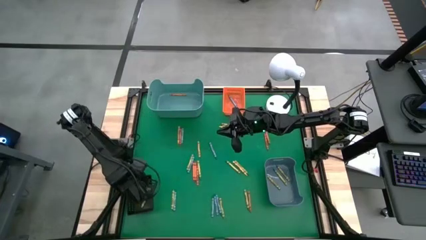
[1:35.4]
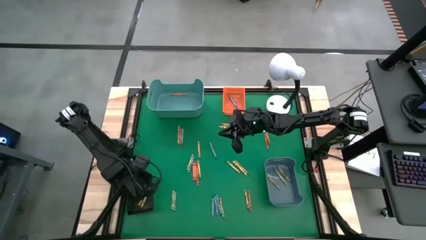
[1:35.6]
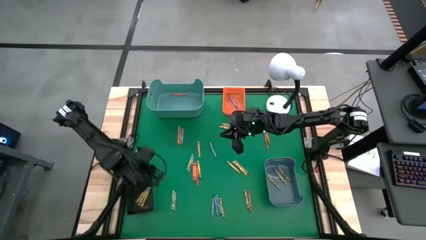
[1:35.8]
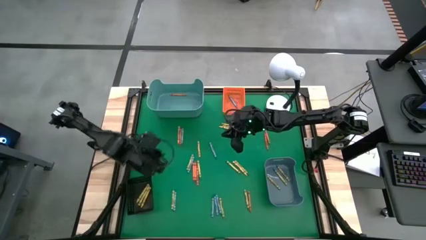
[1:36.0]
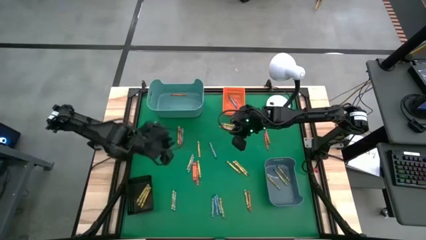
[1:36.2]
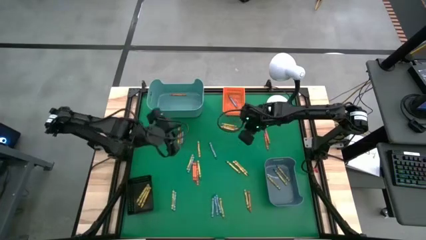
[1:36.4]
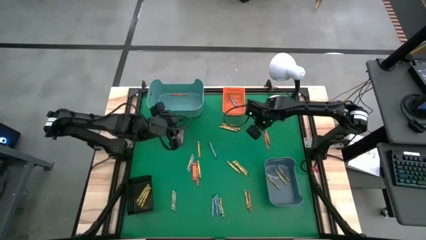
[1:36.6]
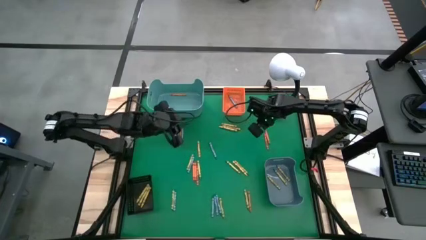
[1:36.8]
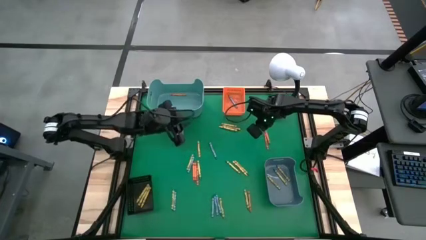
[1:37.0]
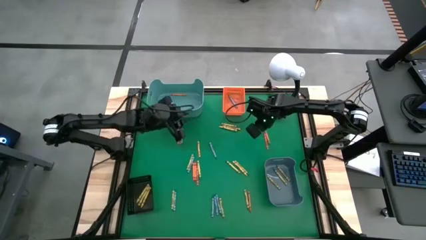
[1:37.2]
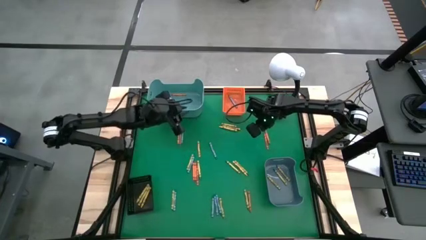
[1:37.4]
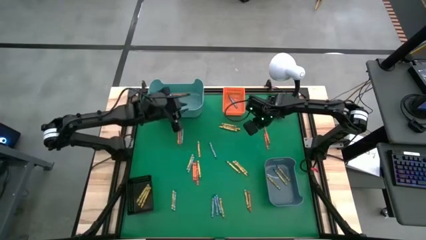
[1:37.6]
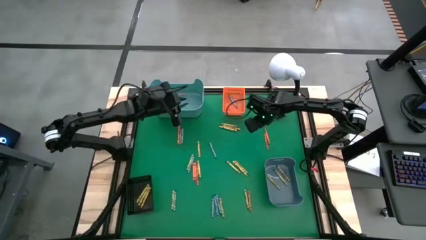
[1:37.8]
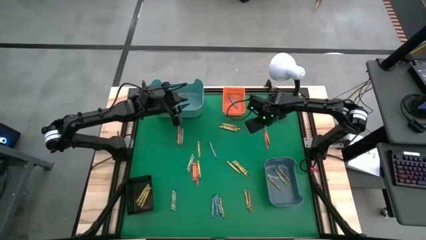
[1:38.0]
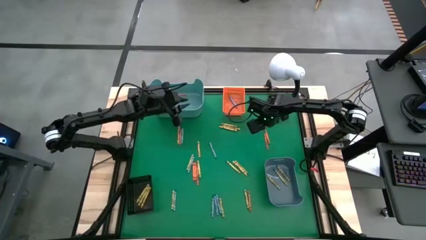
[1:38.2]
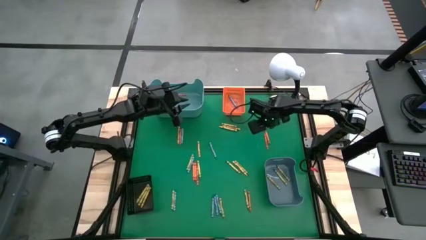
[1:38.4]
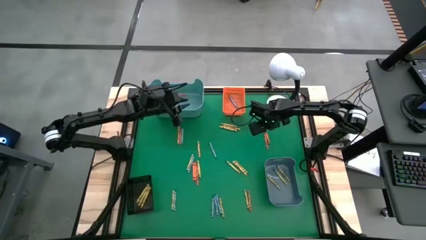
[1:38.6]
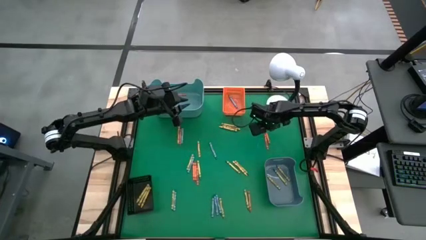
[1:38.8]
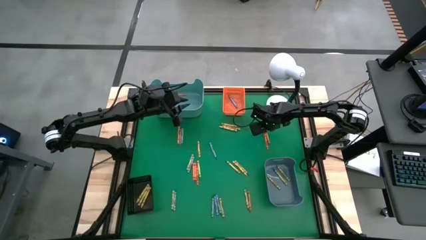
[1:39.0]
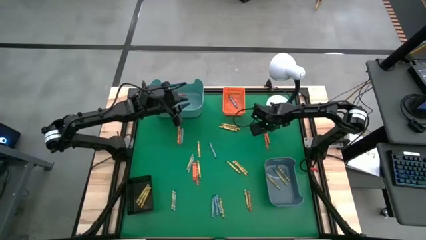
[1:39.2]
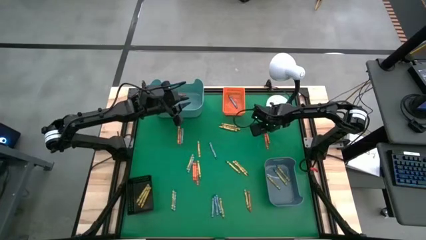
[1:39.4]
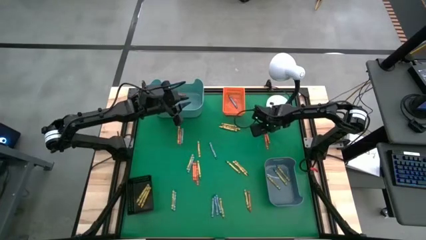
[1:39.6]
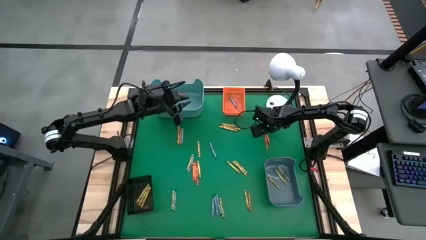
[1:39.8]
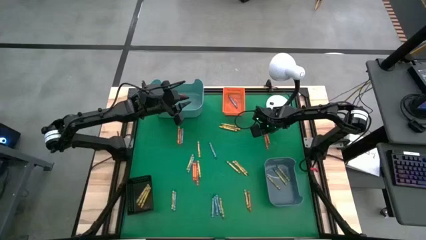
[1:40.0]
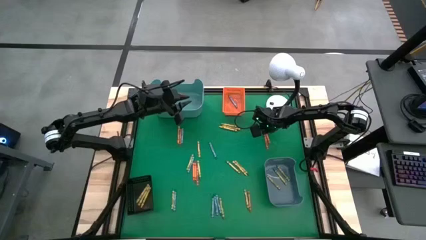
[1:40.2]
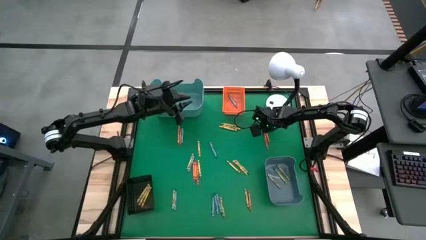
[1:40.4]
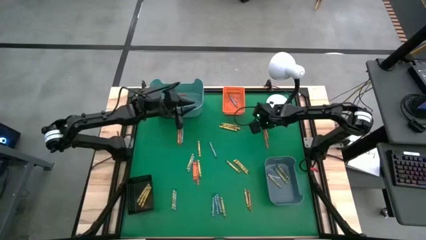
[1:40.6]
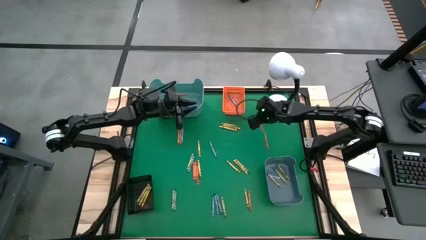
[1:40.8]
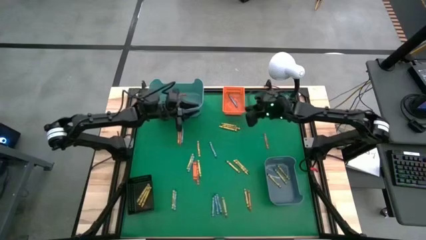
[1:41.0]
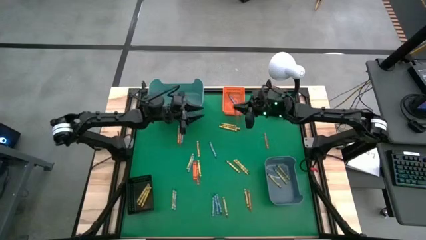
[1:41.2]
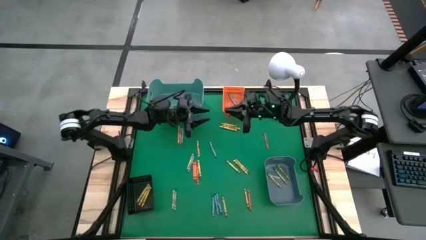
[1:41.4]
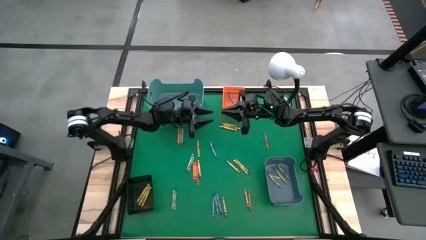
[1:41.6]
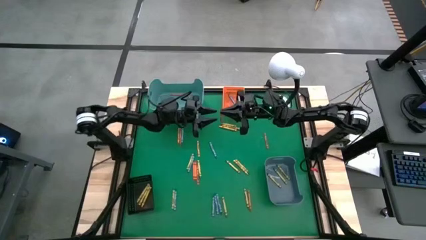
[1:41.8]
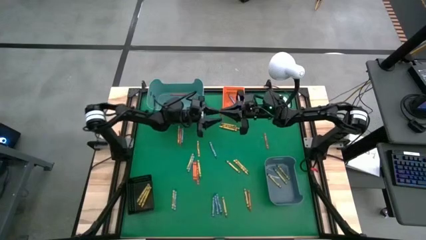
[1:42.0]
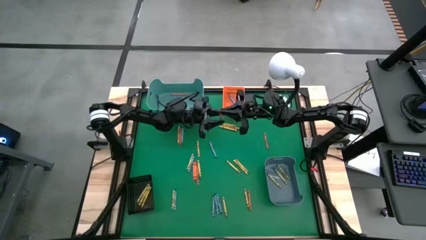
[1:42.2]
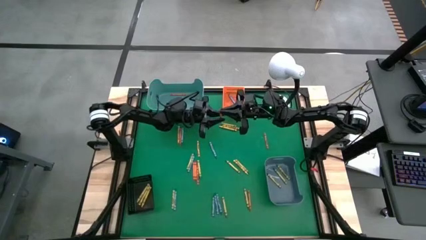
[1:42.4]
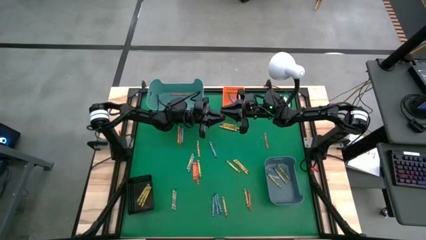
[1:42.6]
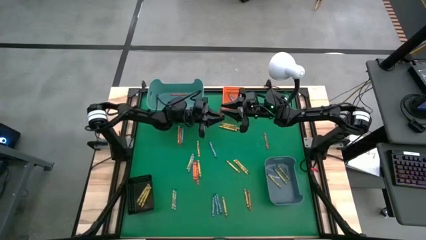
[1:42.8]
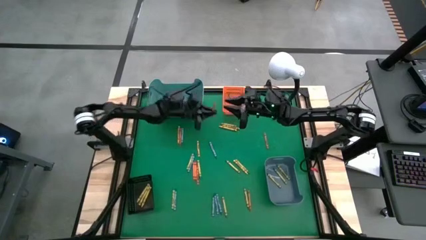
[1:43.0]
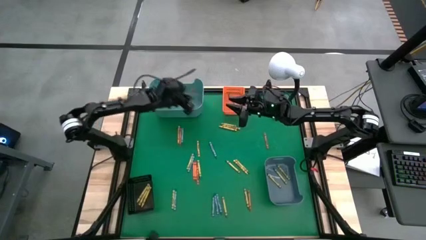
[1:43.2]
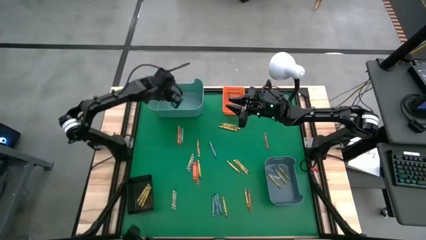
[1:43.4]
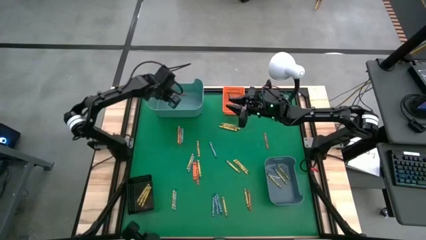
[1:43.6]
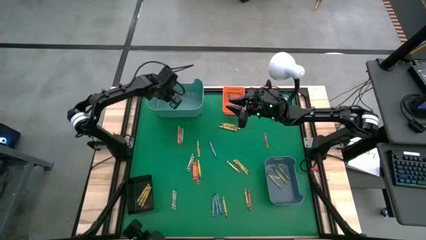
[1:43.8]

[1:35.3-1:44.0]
Task: Sort crayons
Put the orange crayon into the green bin

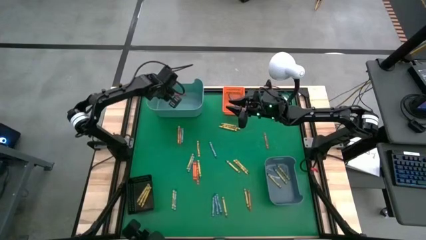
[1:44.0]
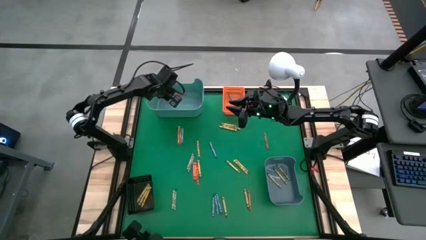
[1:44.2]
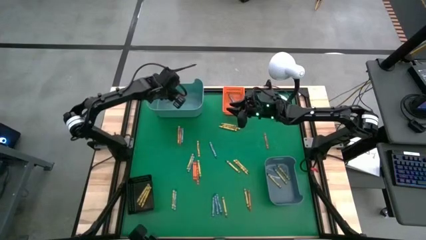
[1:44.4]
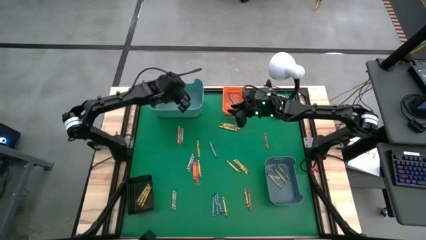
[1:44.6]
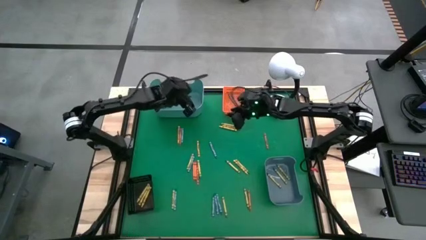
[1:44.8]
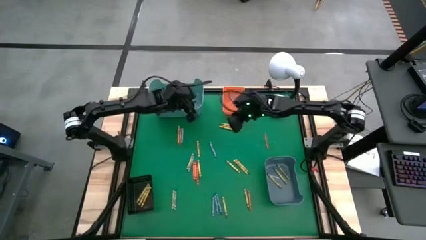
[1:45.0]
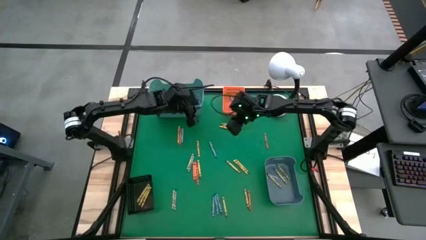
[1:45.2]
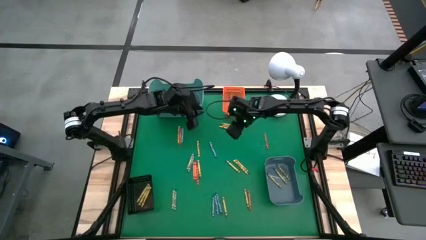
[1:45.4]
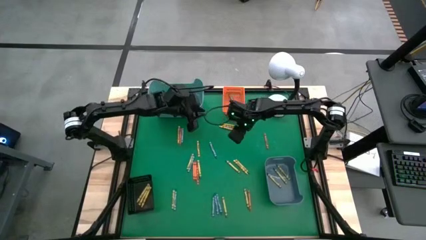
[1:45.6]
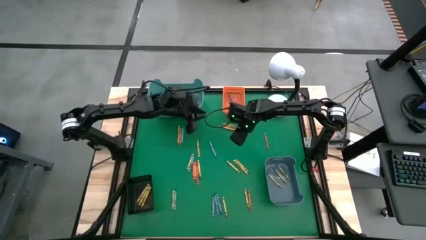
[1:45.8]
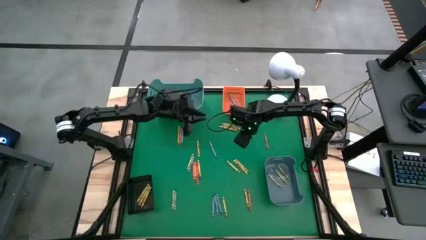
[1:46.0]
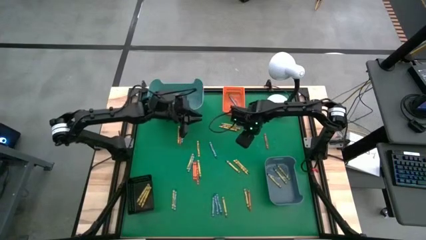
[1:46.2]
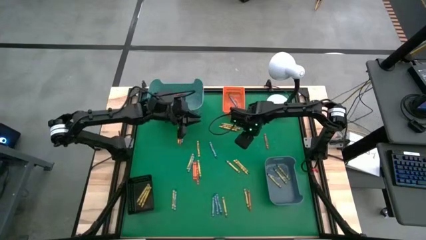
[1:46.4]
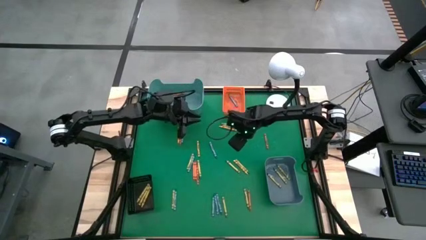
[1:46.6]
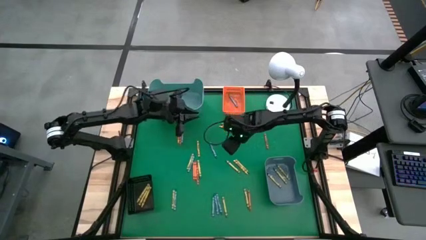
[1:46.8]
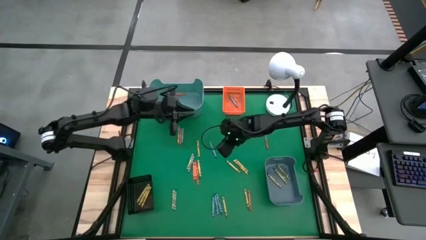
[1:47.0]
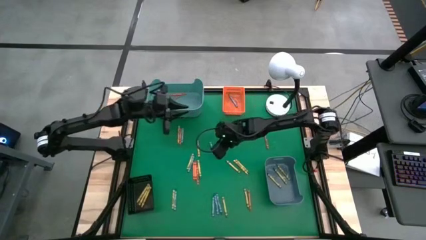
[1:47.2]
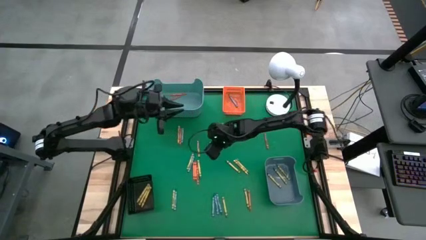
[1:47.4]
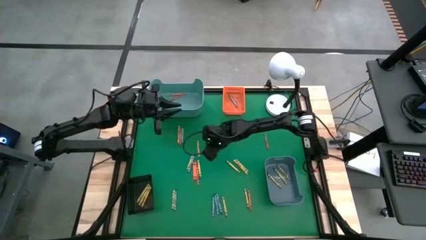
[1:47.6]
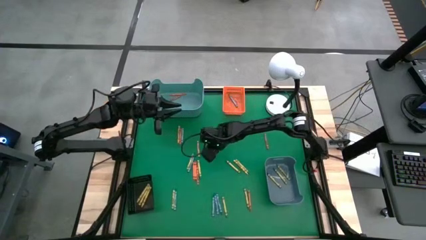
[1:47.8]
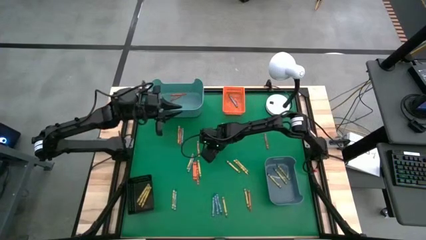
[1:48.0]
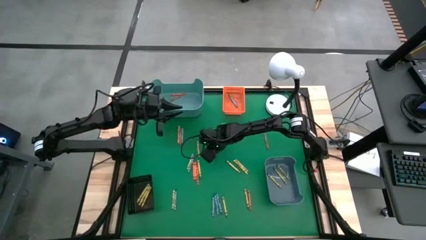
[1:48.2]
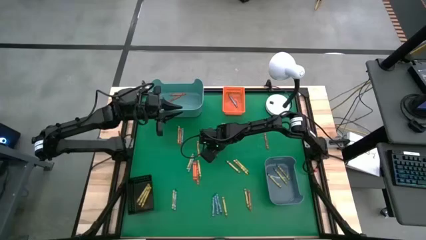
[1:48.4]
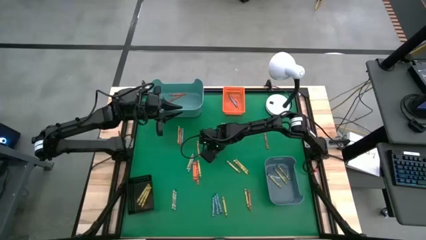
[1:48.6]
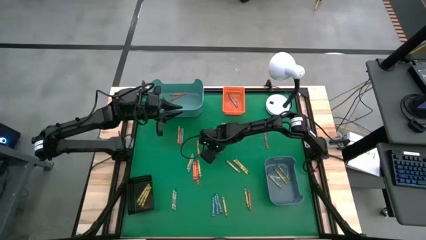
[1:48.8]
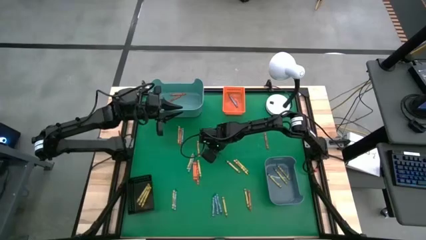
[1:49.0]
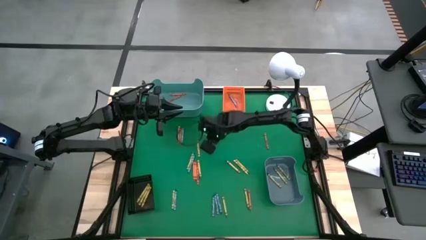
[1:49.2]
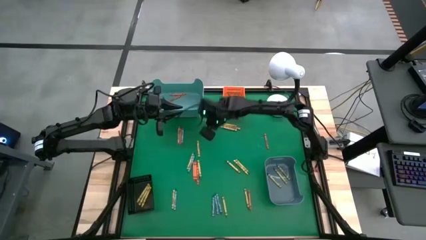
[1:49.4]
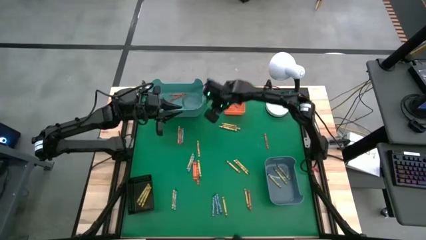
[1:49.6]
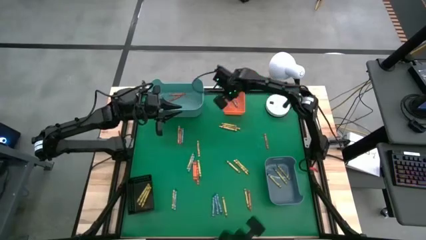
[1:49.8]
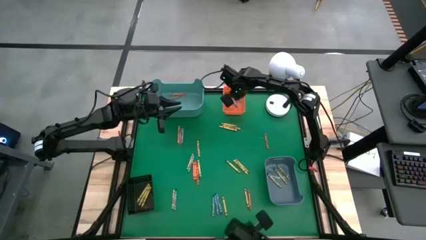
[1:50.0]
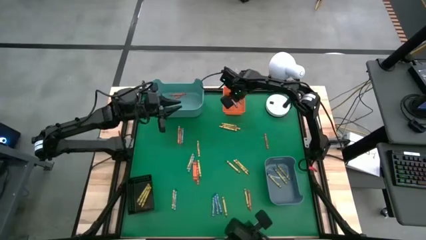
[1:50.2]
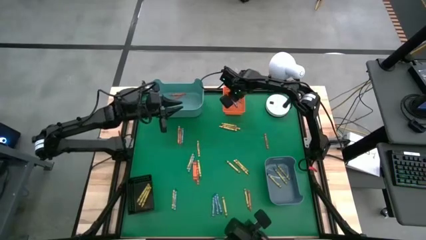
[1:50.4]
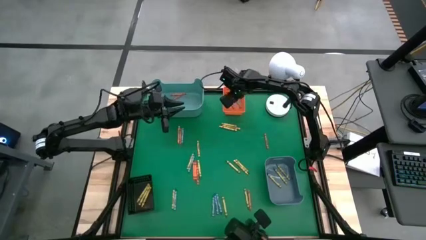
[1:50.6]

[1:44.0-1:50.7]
Put the blue crayon into the orange bin

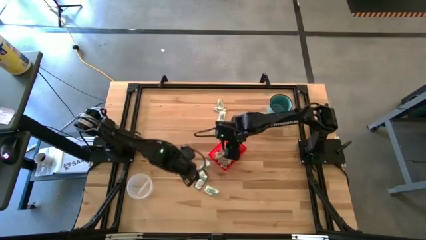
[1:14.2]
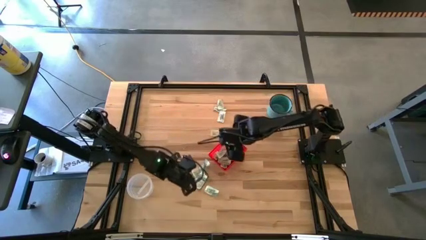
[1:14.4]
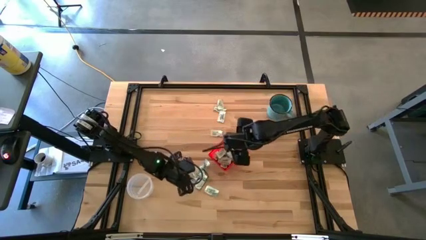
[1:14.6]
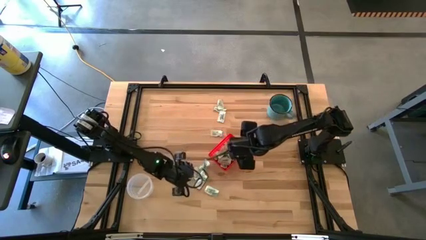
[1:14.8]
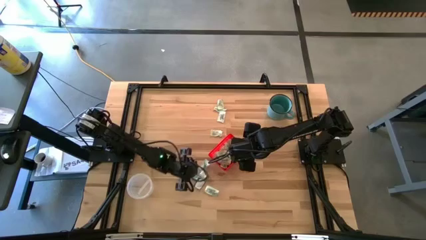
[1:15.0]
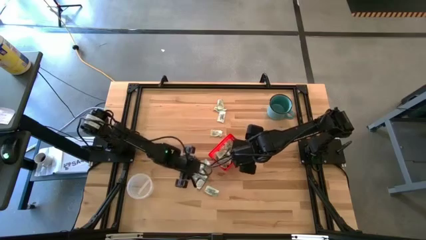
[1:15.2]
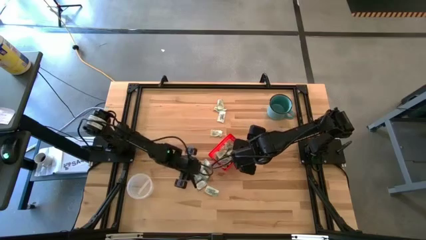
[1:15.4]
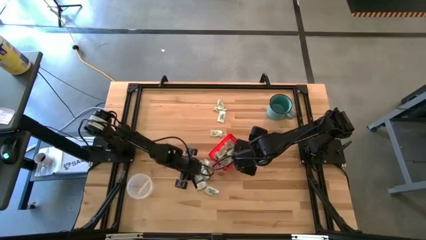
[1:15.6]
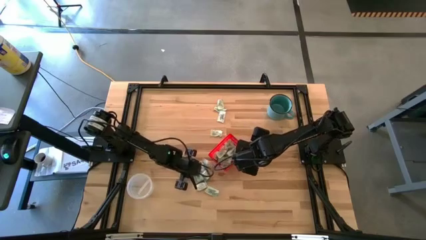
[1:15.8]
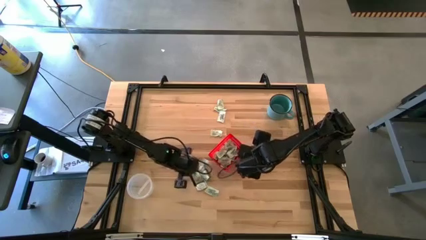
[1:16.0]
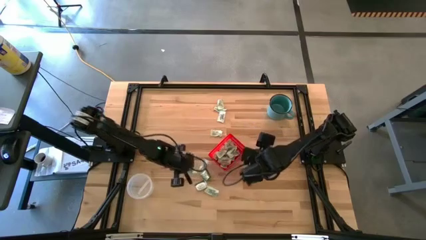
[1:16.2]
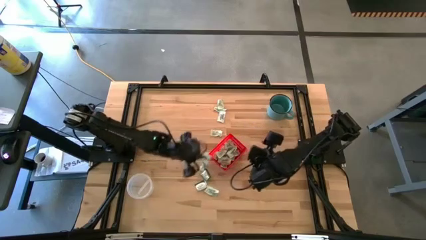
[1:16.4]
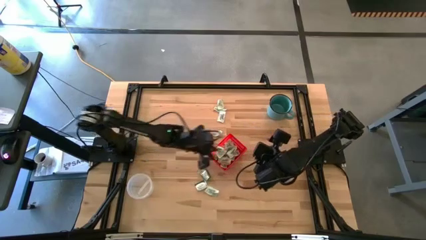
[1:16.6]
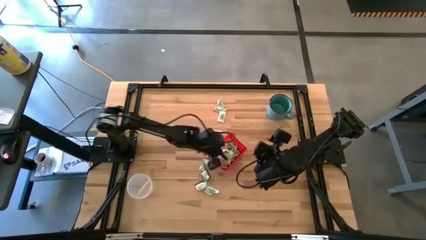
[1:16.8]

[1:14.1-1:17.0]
Task: Pick and place items into bin
Put the white stevia pack into the red bin
